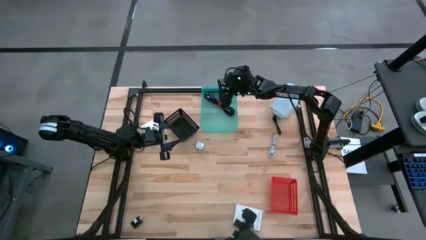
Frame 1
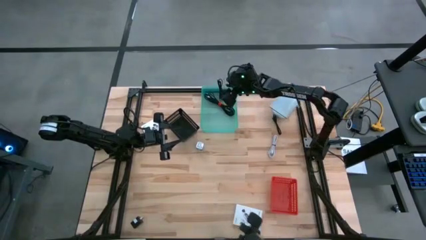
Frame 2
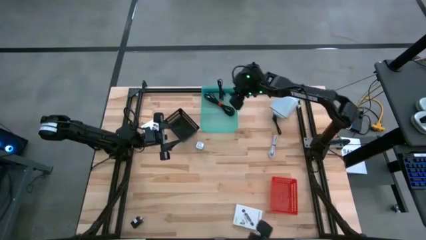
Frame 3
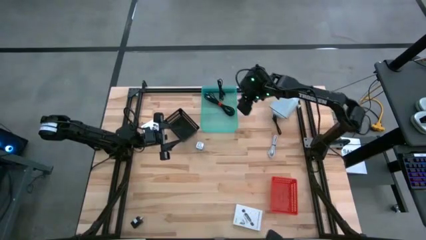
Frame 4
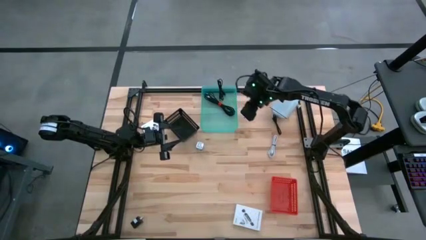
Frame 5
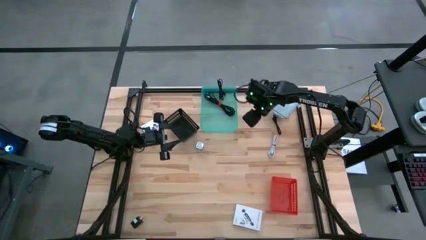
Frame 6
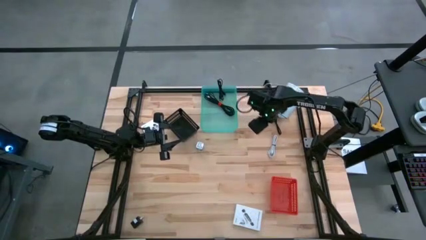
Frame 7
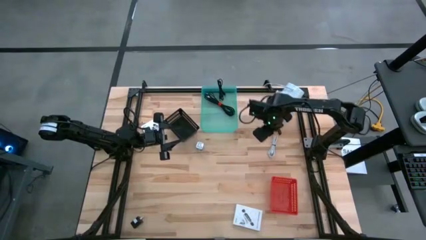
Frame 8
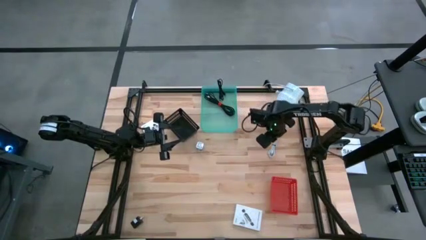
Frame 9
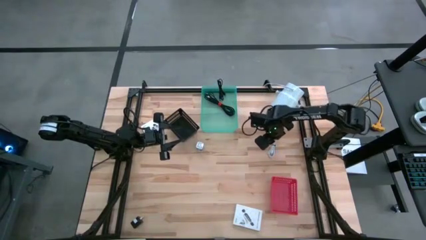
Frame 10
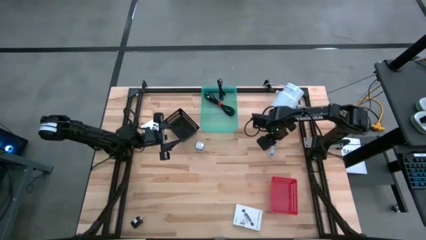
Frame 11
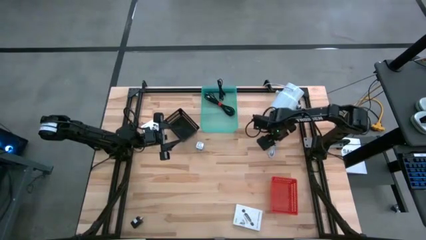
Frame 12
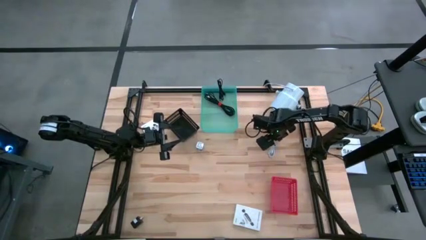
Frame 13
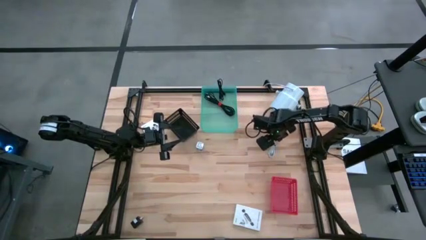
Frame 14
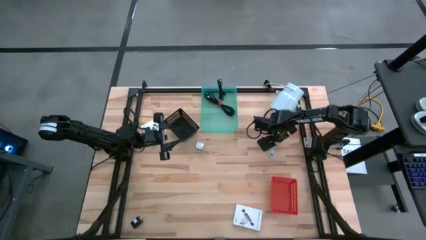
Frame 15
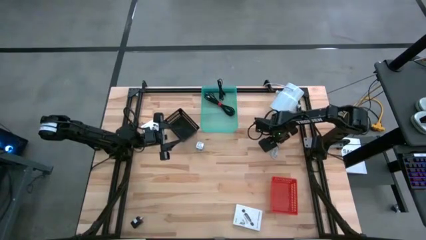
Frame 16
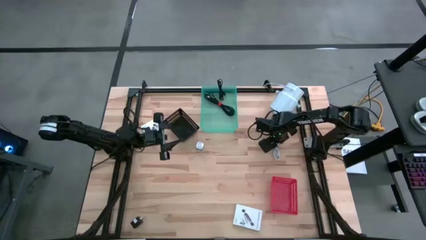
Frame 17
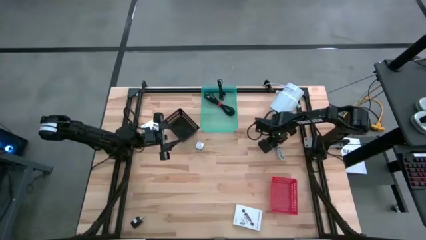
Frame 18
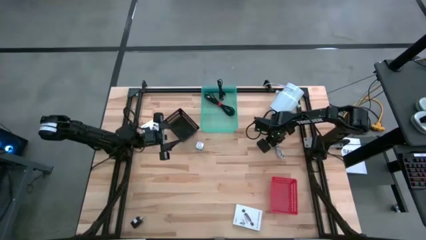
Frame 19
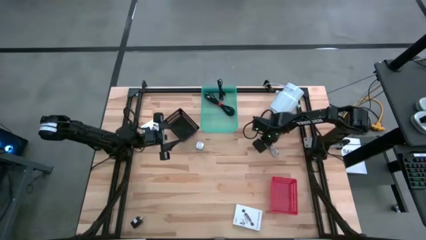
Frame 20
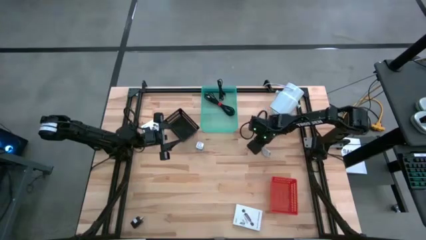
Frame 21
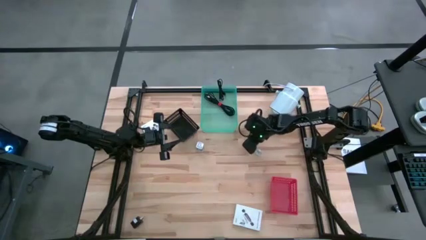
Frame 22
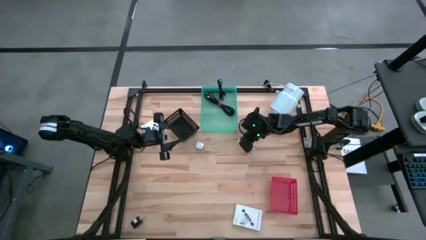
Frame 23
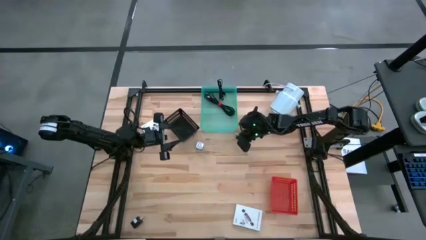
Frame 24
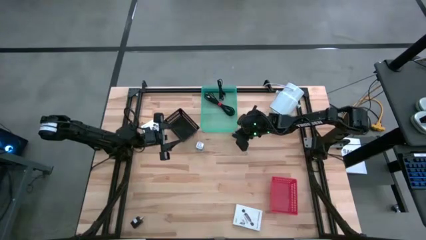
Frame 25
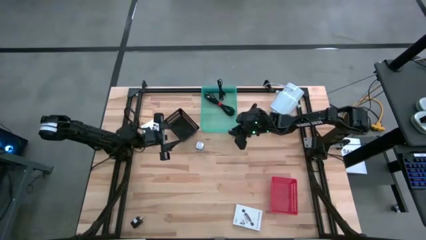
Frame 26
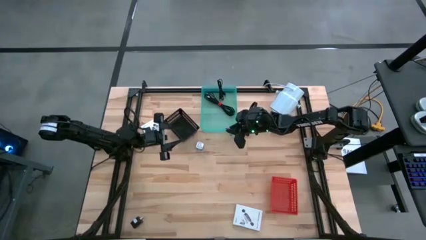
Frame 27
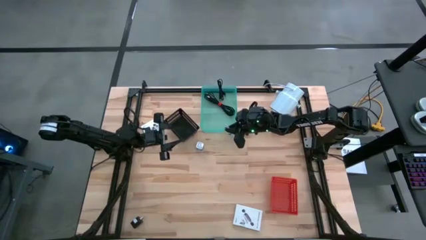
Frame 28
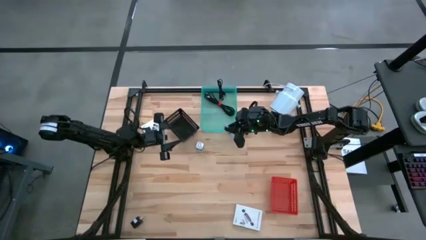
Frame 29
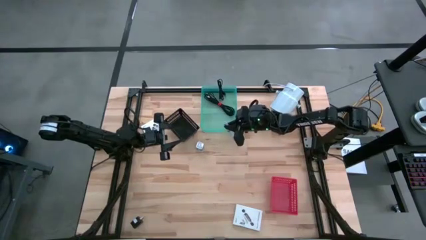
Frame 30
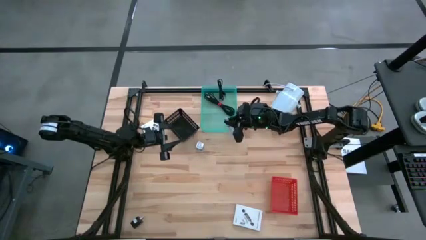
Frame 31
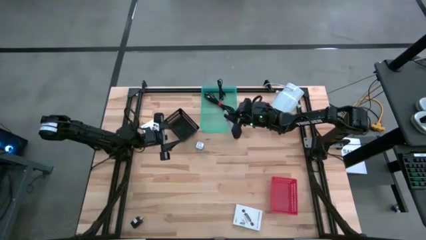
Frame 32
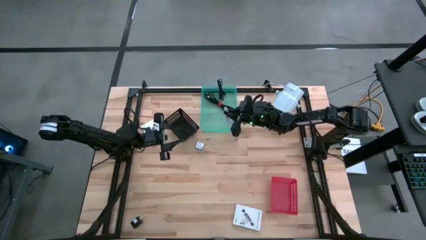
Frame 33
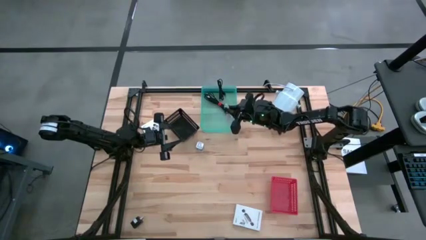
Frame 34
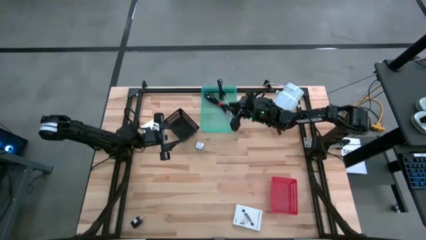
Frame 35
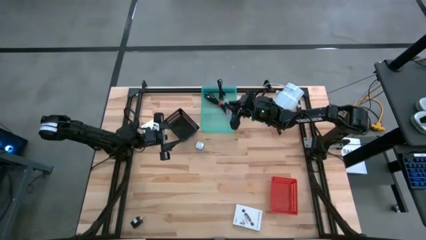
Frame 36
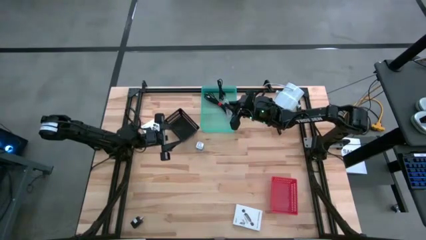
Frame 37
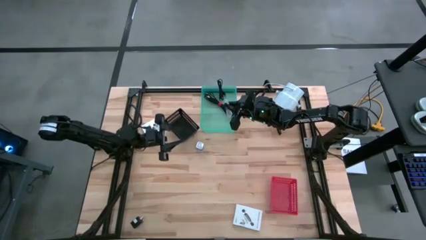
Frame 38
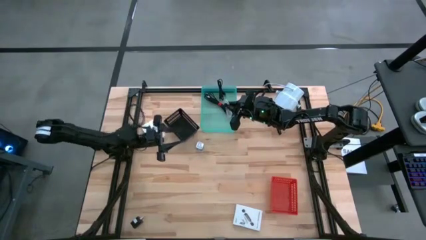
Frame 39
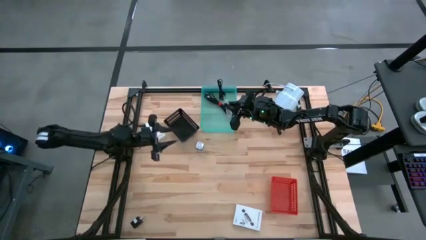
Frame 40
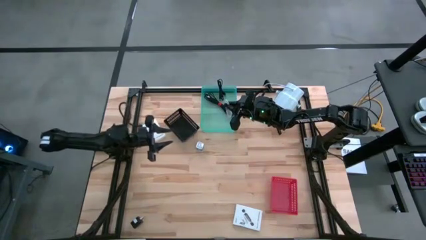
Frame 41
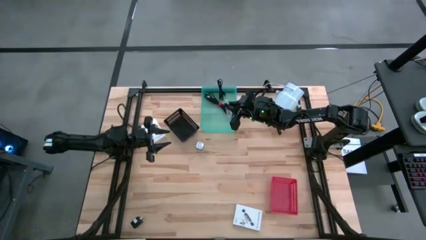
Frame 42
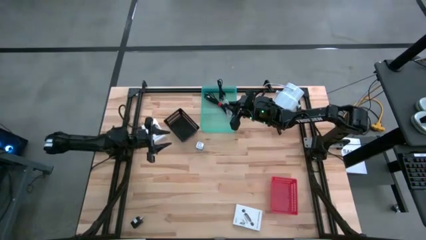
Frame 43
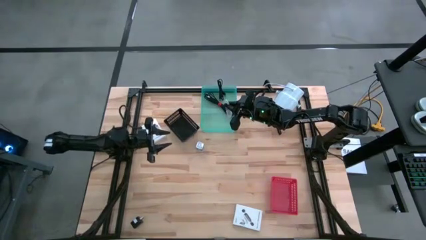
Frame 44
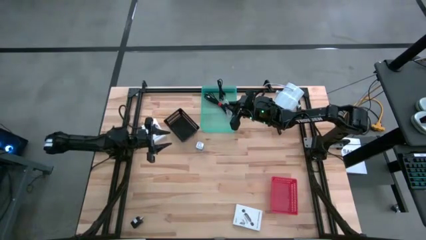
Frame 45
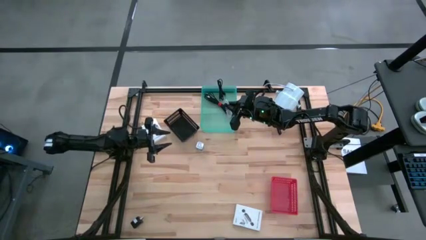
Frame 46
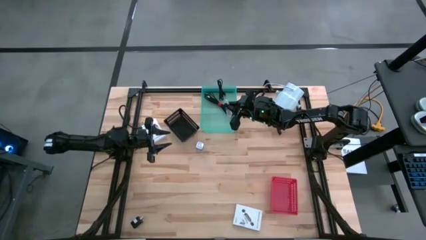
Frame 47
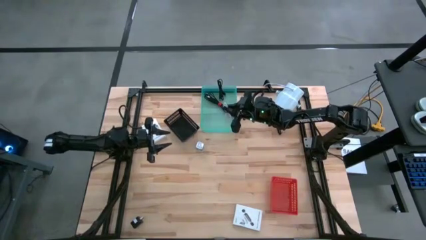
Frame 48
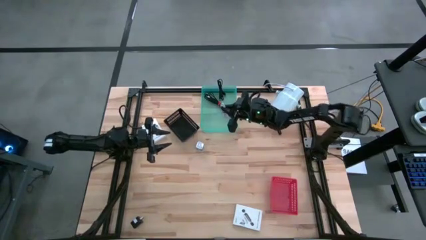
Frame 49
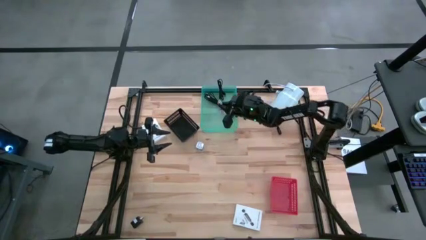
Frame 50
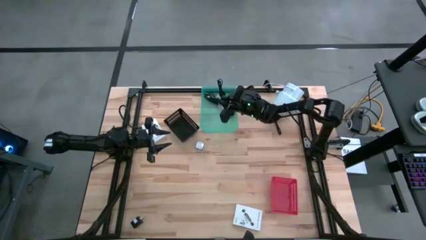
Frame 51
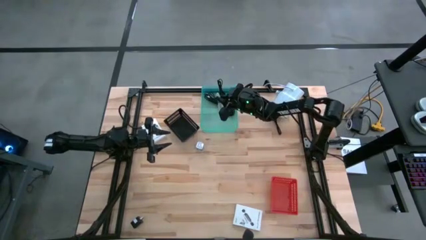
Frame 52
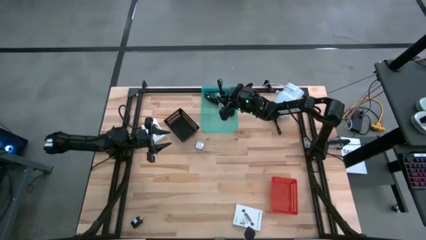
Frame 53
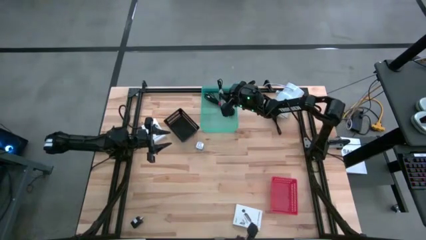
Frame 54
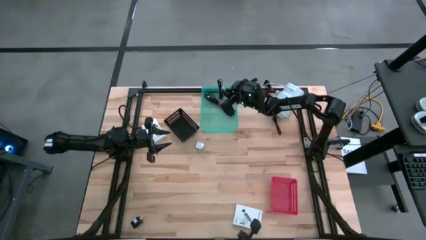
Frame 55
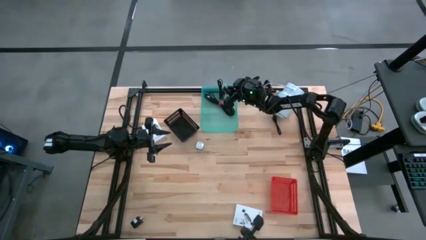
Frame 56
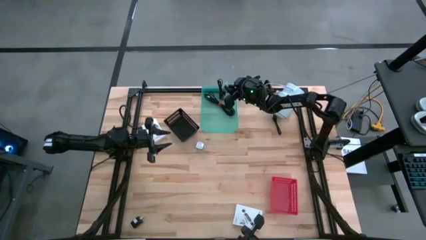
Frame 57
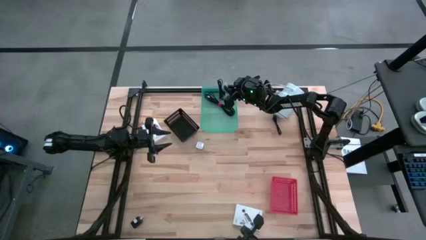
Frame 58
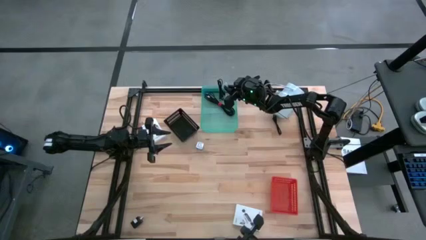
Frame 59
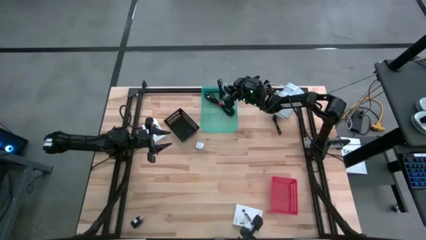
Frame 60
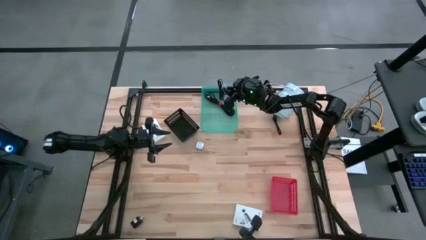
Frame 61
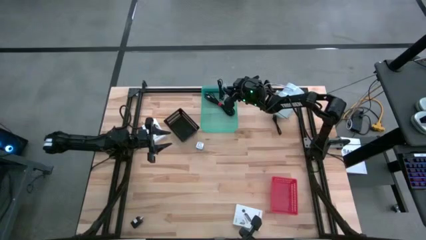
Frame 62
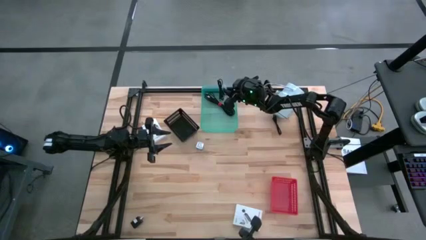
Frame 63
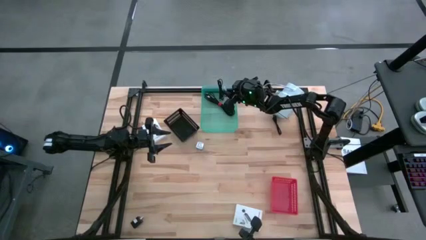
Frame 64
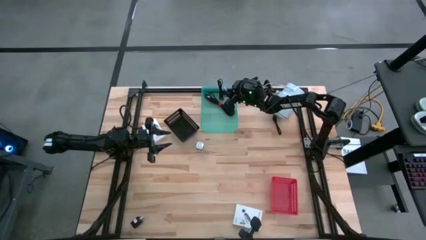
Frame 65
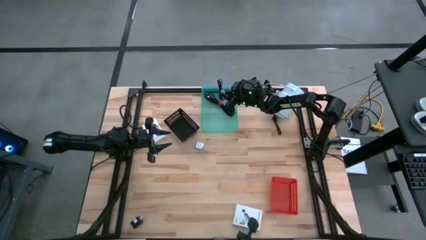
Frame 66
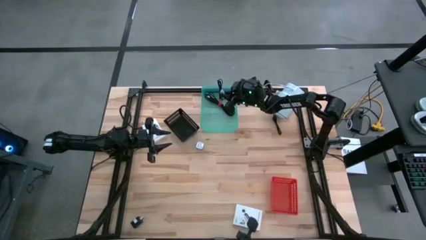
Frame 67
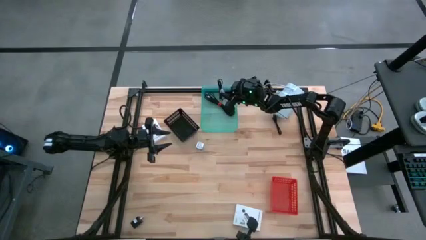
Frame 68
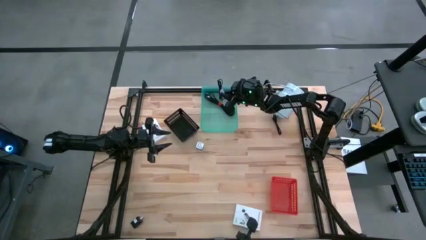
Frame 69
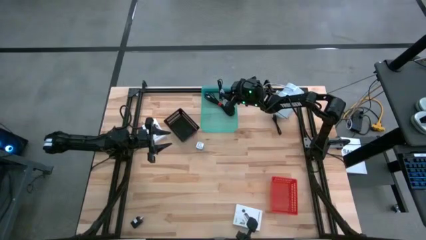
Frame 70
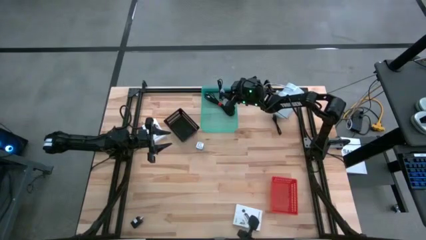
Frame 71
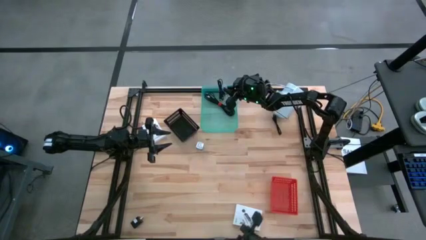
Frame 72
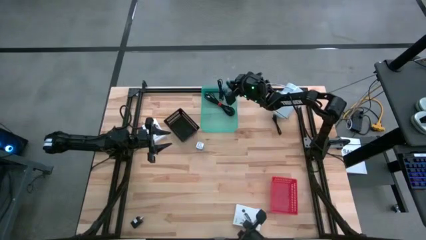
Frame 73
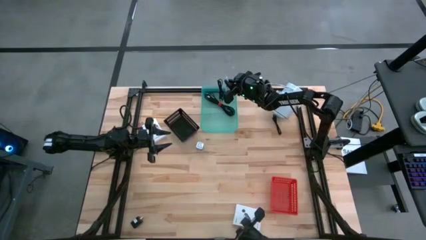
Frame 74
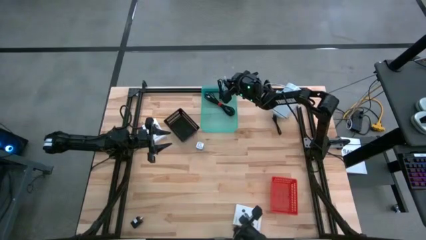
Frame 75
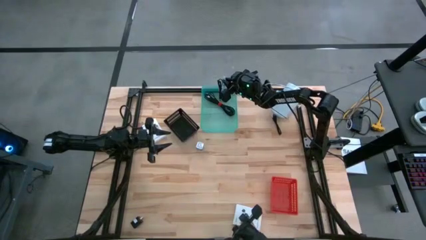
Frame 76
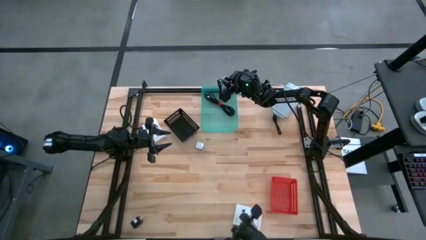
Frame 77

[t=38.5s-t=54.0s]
Task: Pick and place items into bin
Put the white charger cable into the green bin
